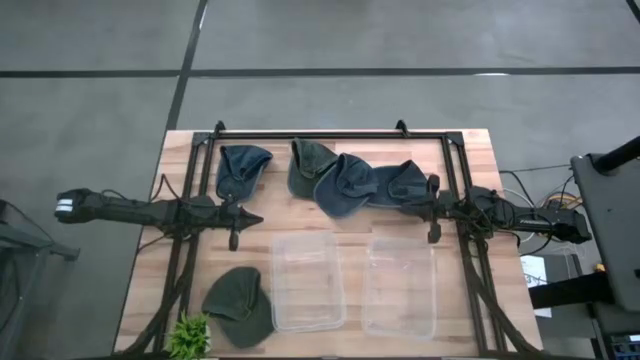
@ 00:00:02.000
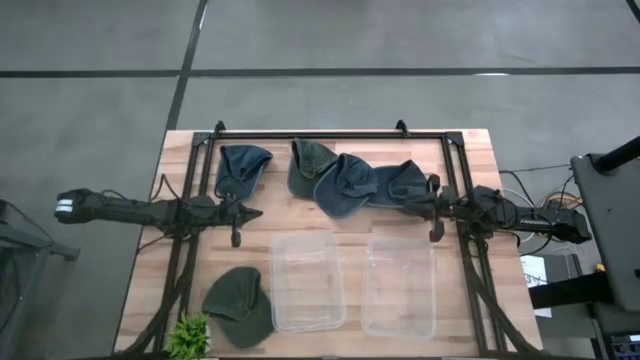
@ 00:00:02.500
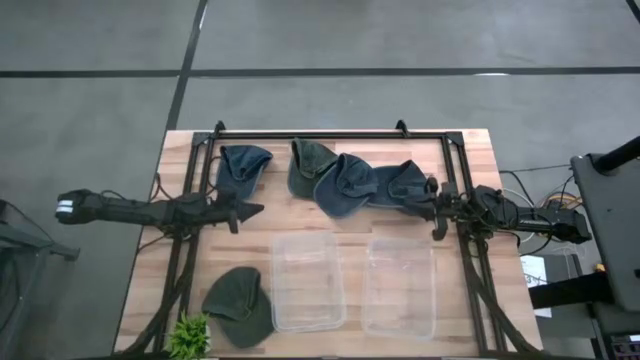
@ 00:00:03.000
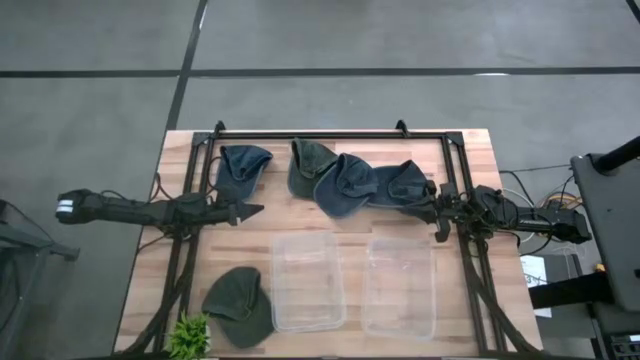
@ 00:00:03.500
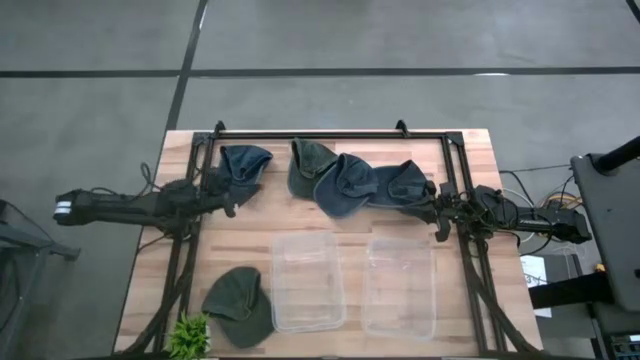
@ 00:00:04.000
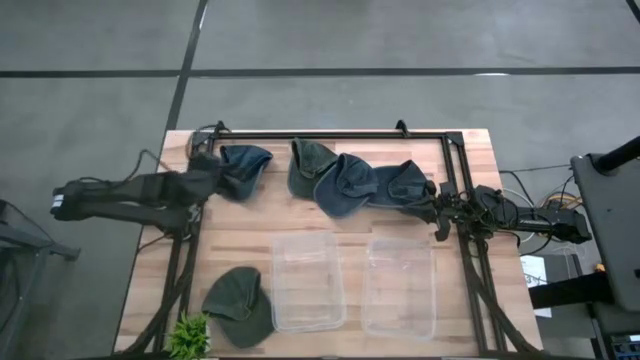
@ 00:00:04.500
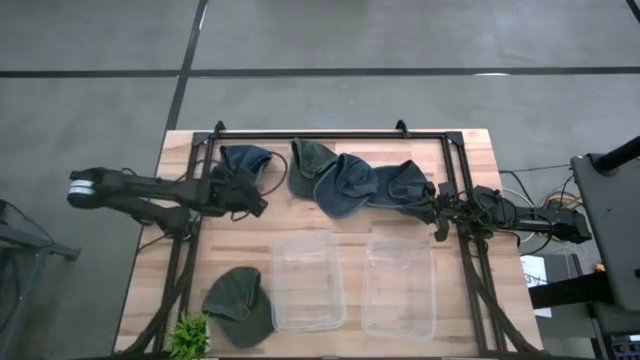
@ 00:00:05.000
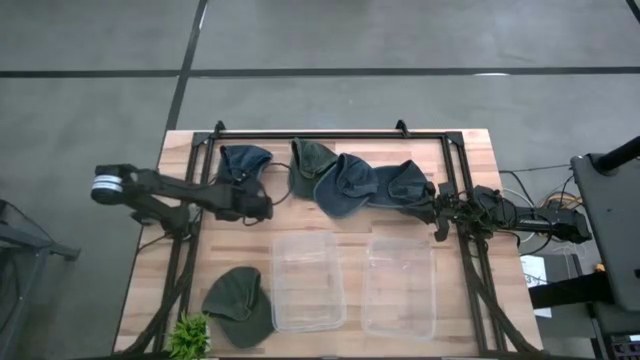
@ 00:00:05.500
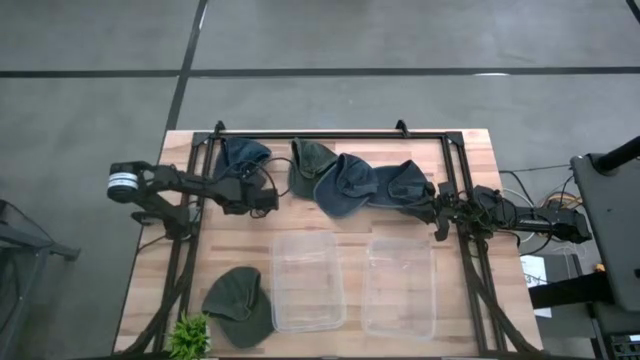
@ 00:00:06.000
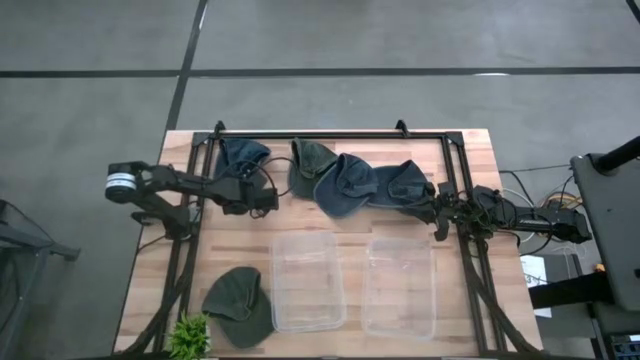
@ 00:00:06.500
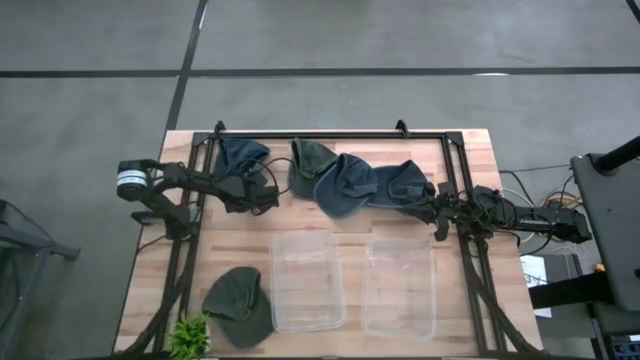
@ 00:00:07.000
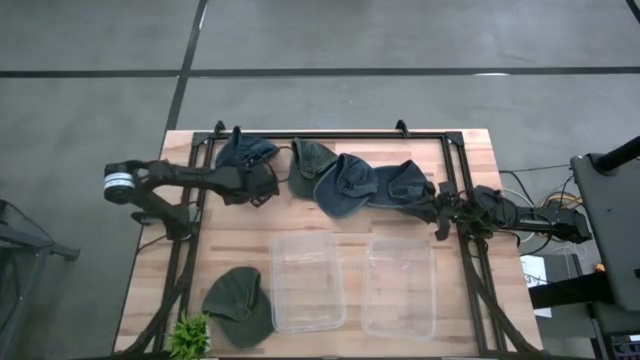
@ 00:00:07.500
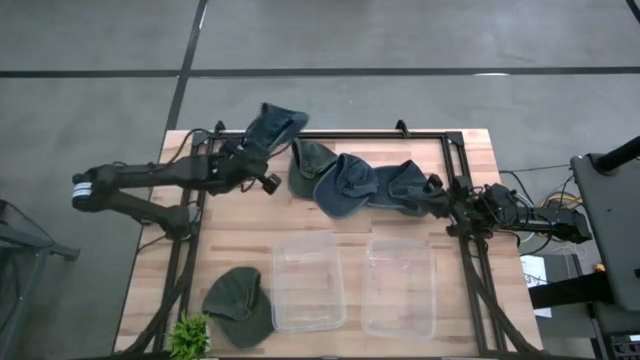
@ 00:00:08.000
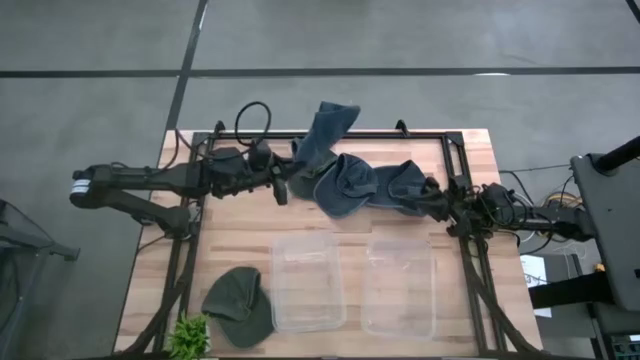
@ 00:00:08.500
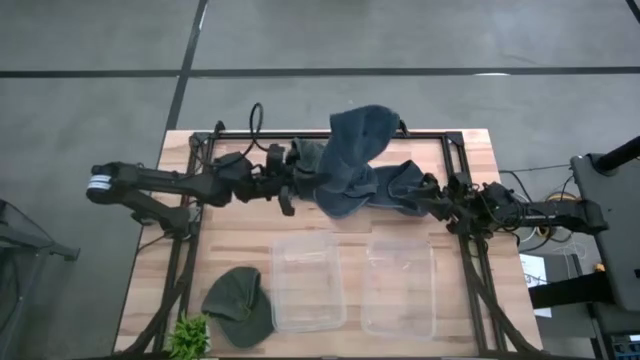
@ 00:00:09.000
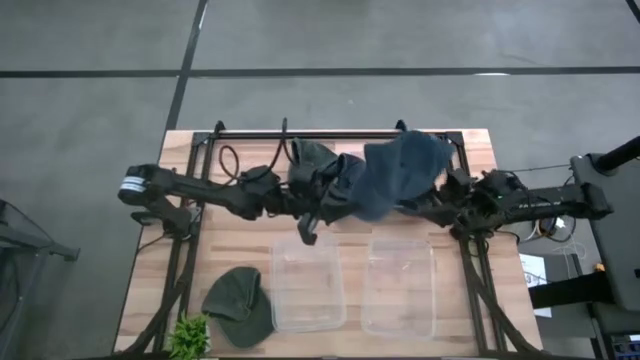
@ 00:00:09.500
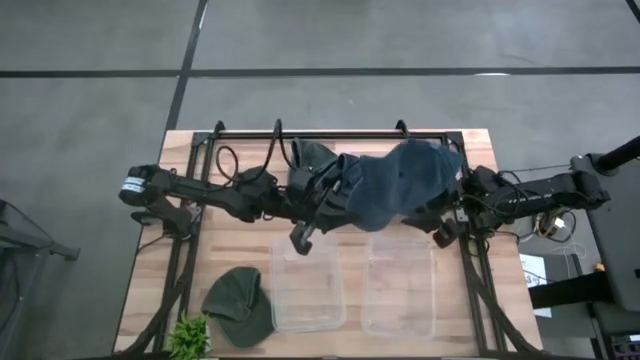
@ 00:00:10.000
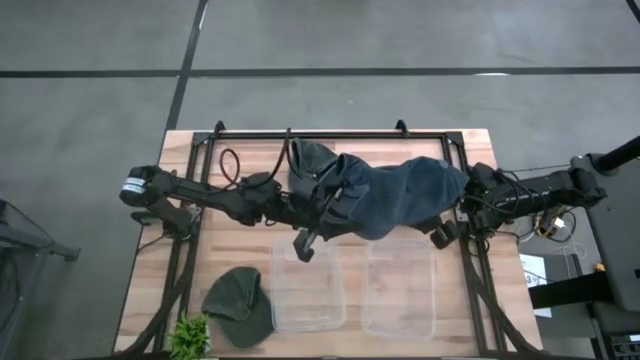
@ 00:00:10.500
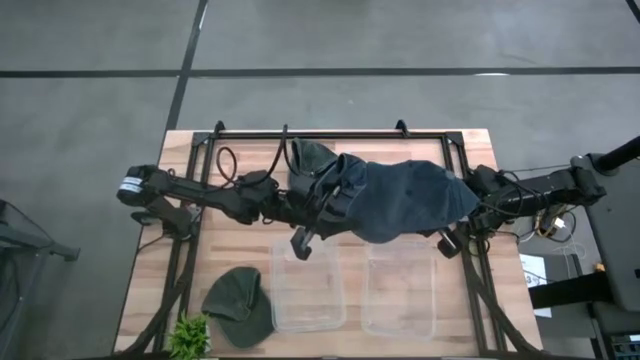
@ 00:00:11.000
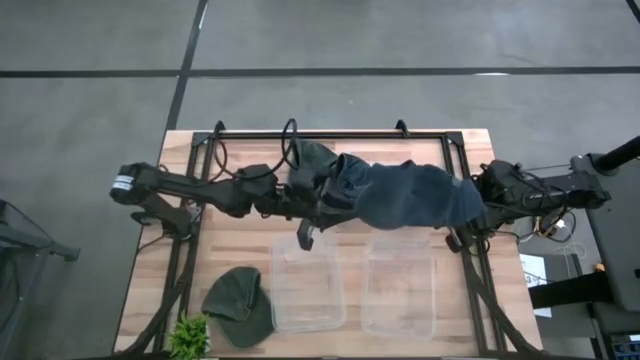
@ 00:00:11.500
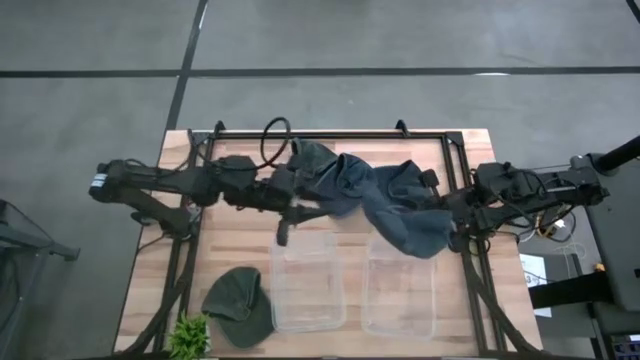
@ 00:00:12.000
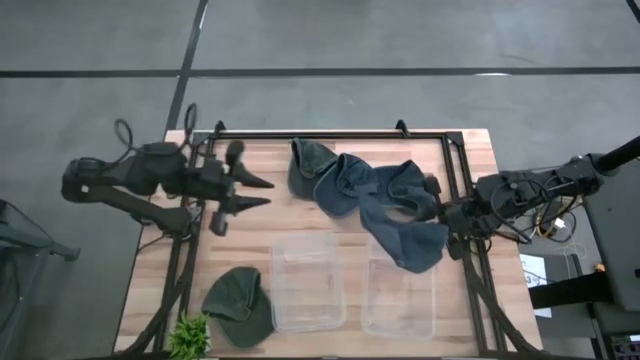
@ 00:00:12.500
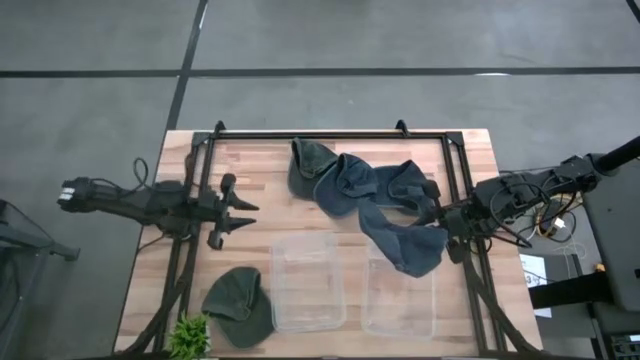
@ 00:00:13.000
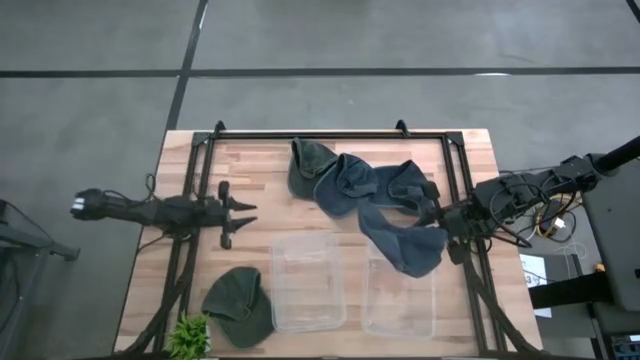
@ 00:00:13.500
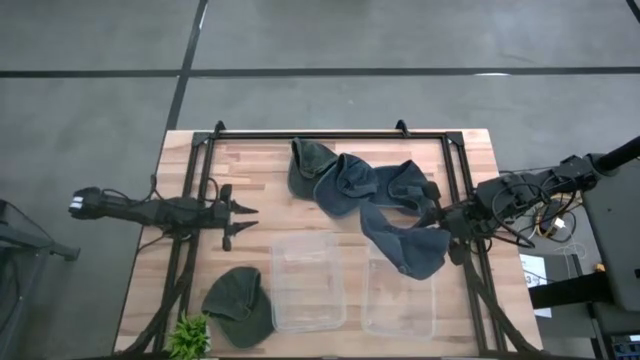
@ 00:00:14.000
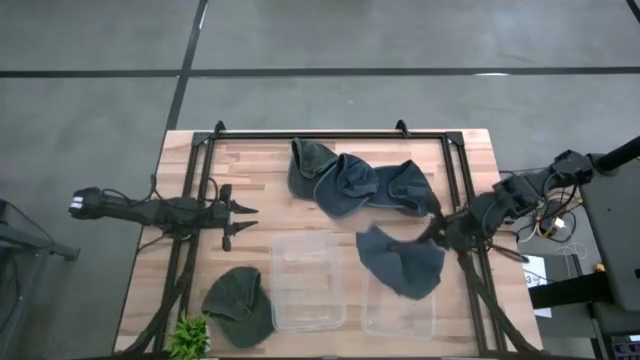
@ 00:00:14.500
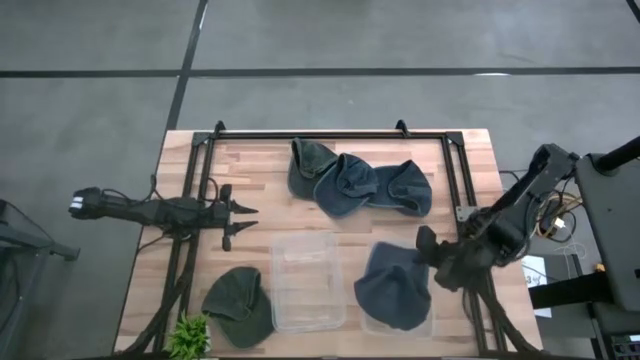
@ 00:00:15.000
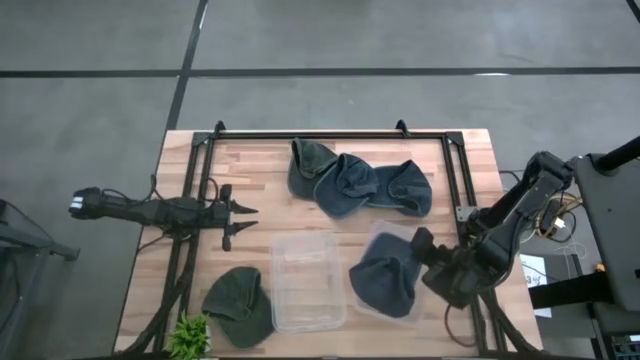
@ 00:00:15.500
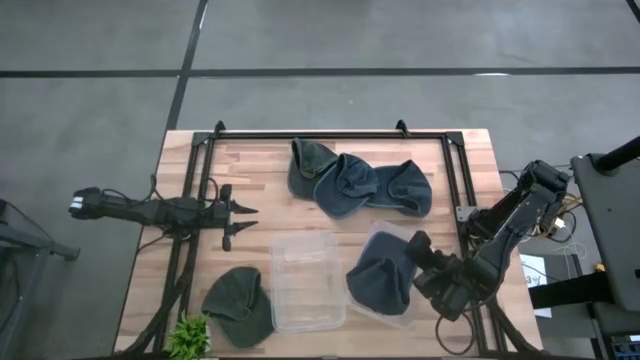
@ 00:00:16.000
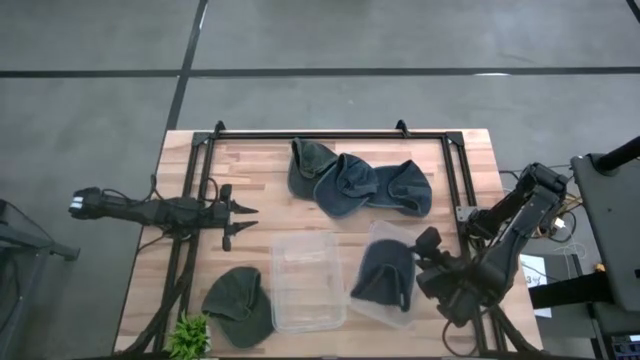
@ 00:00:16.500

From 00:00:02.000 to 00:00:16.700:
Task: Pick & Place hat
Put the left blue cap into the right transparent container

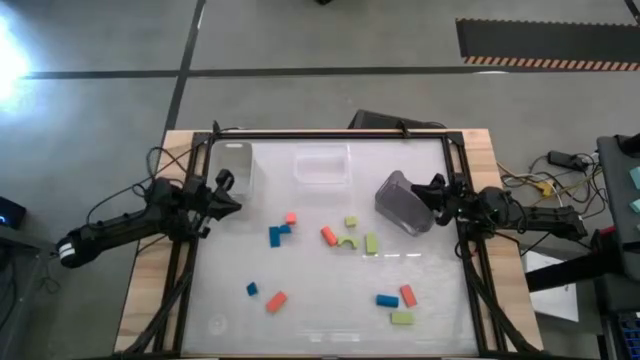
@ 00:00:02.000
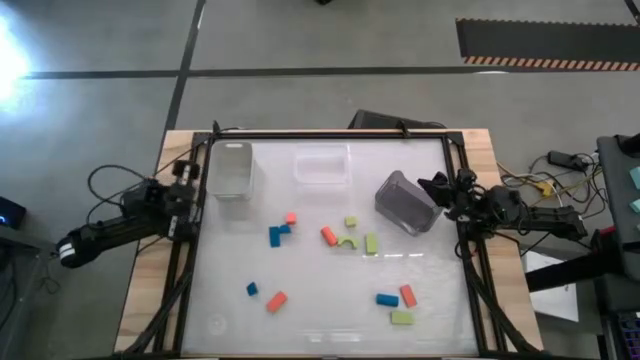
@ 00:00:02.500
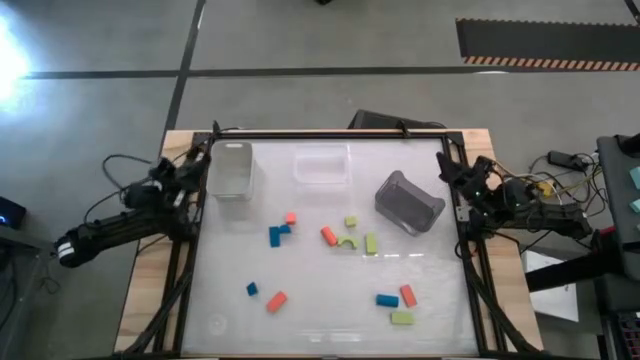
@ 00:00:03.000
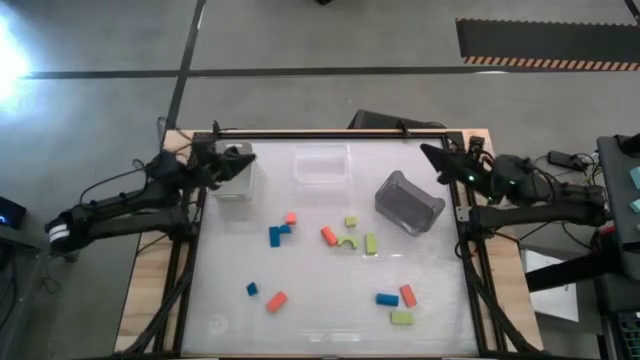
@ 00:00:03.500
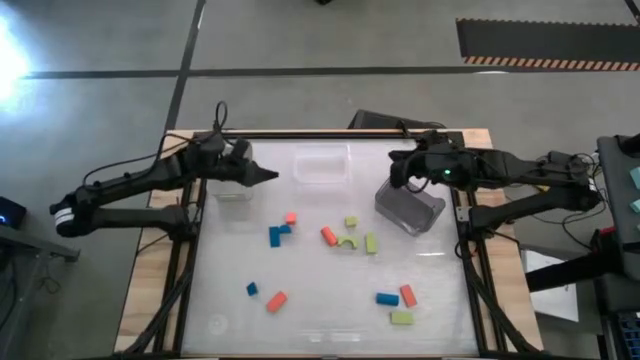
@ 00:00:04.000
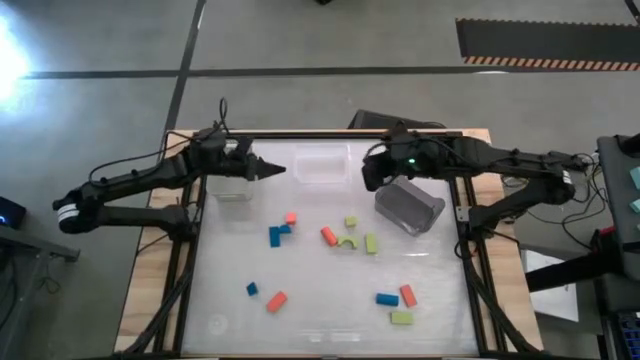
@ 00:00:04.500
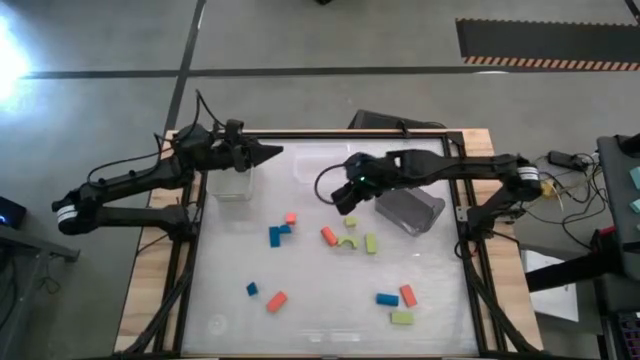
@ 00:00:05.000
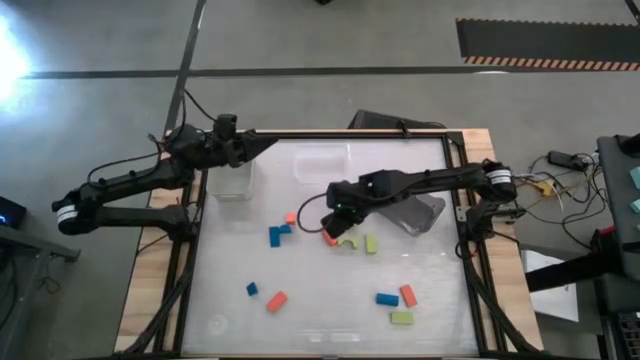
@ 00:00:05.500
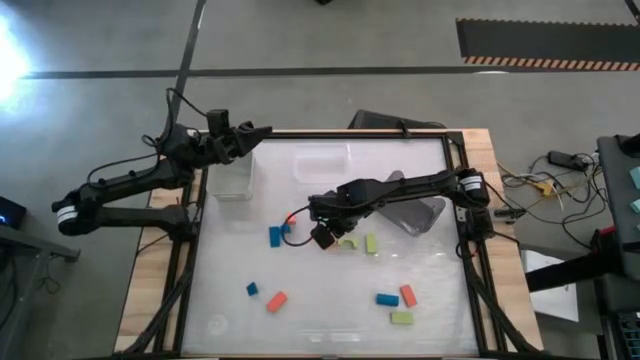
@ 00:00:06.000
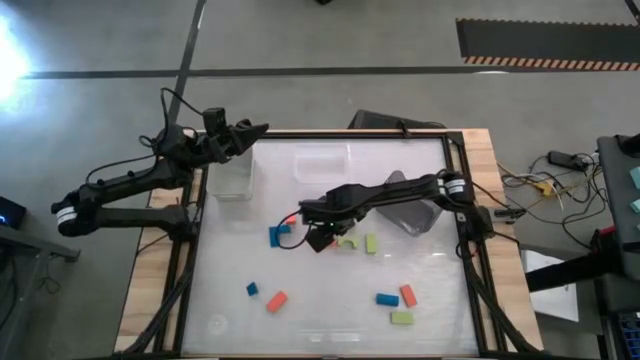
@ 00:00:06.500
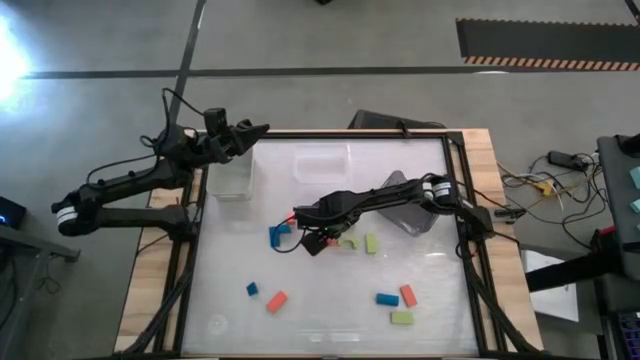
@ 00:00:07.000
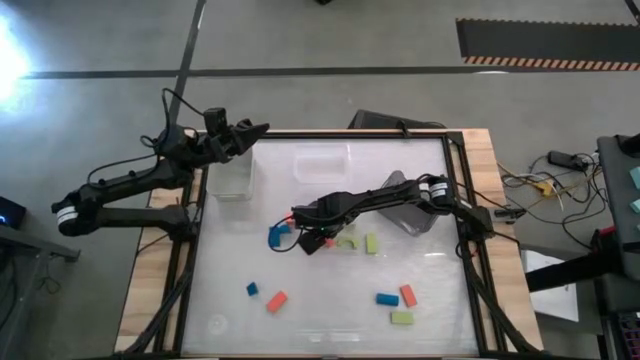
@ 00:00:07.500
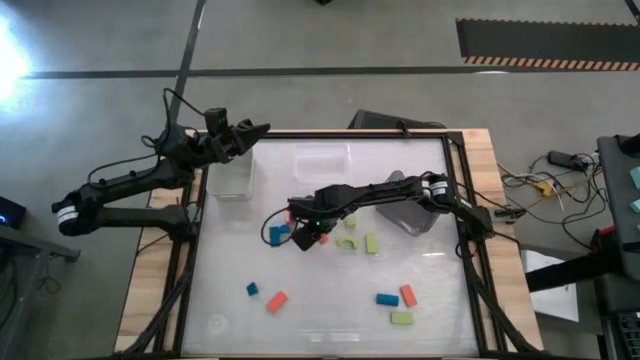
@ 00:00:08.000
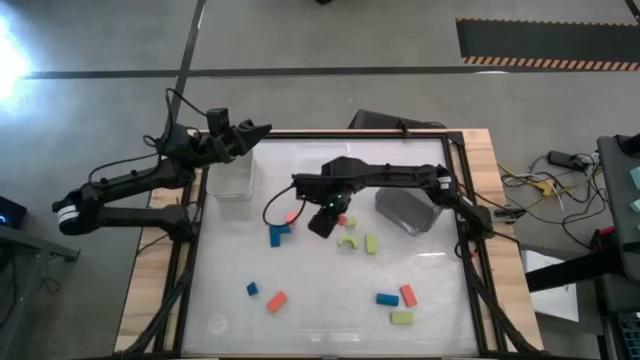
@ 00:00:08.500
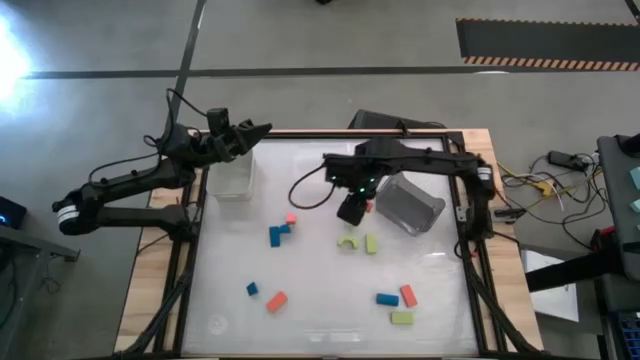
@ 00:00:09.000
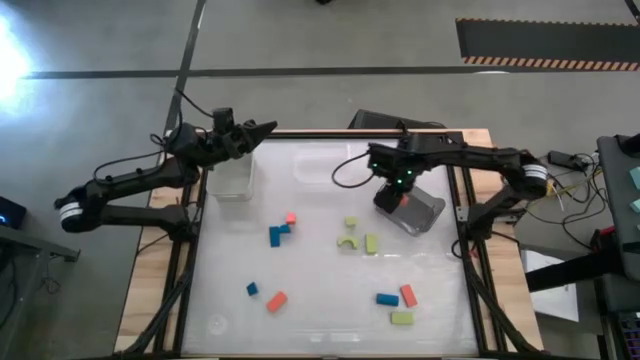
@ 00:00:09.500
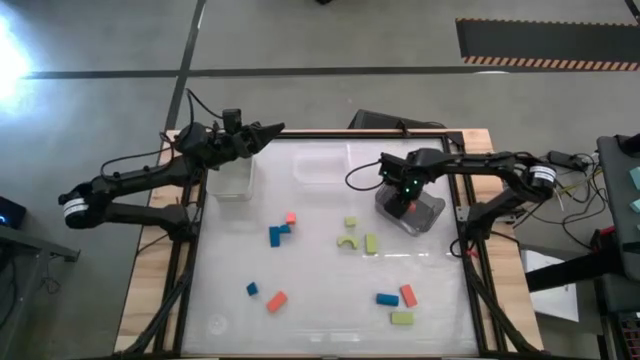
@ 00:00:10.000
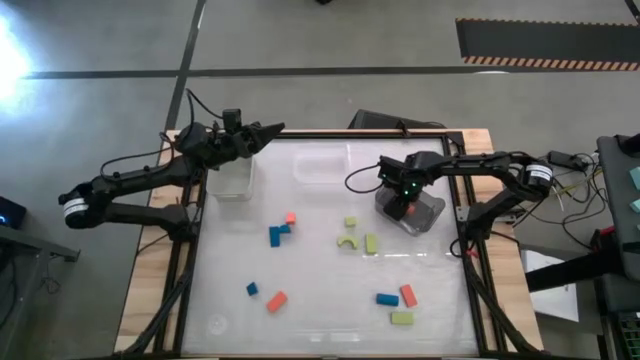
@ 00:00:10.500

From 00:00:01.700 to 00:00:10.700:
Task: Sort & place blocks by color
Put the orange block into the black bin
